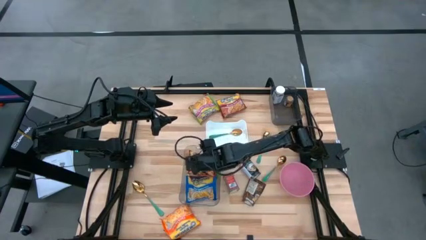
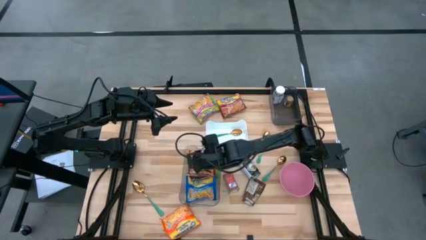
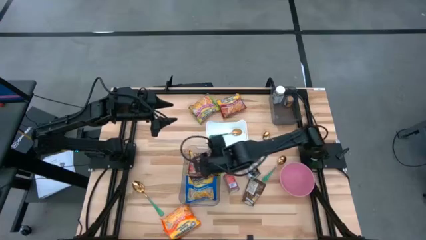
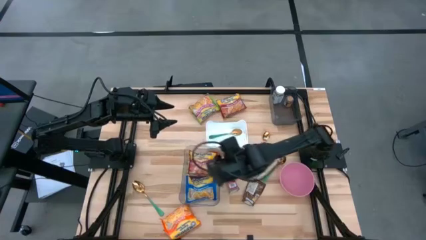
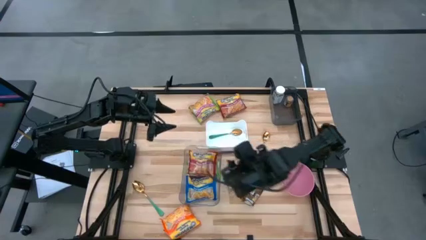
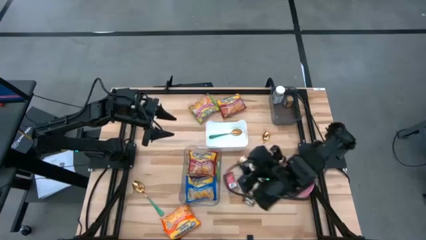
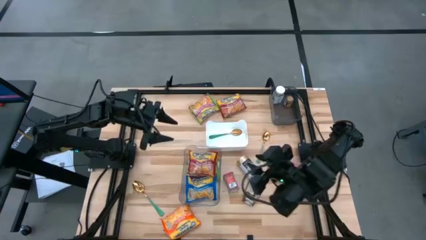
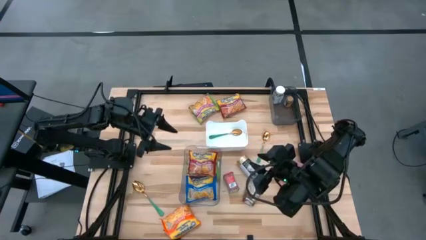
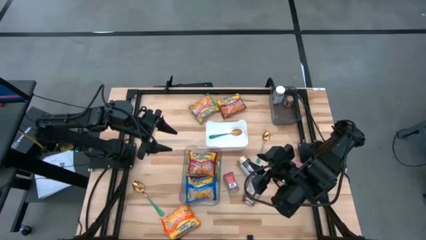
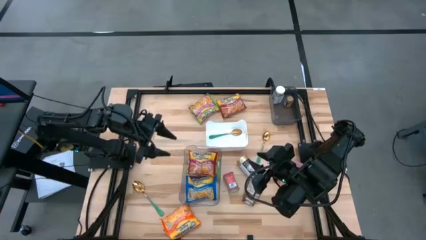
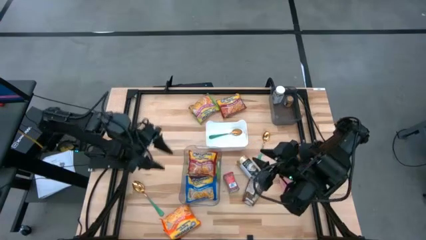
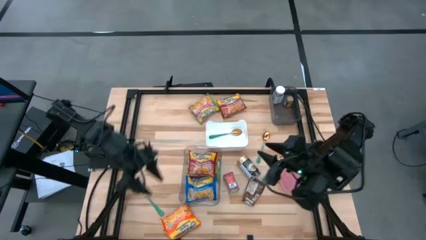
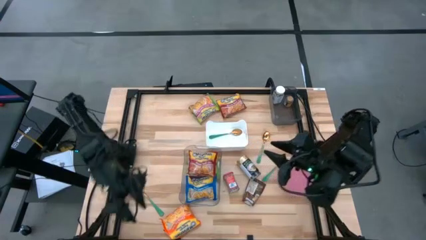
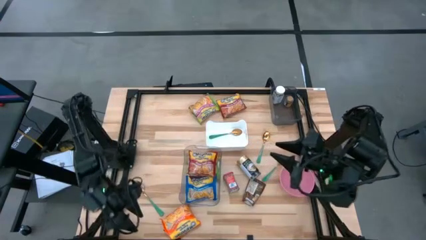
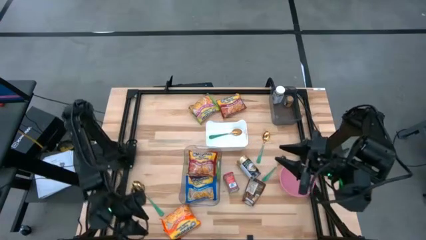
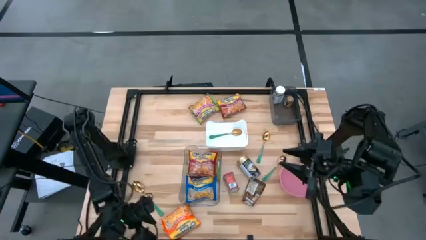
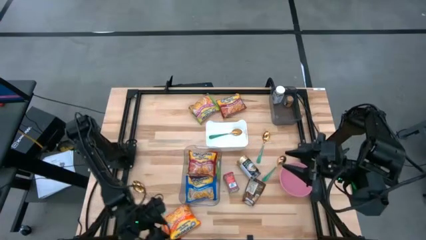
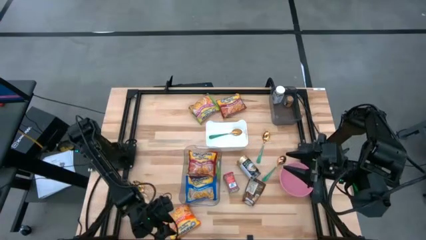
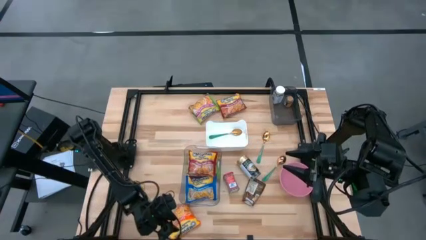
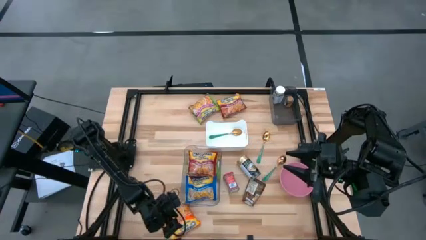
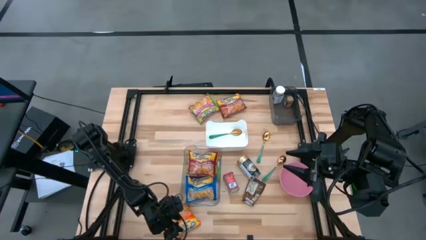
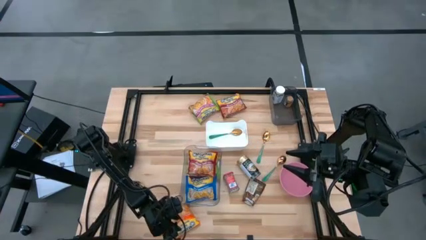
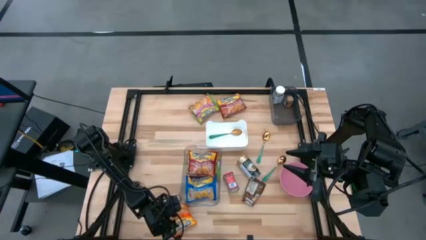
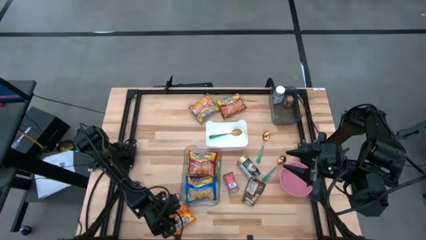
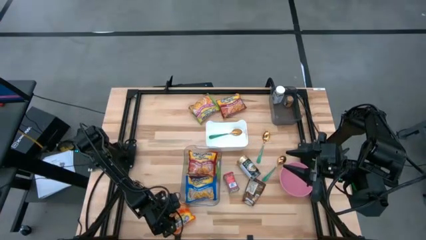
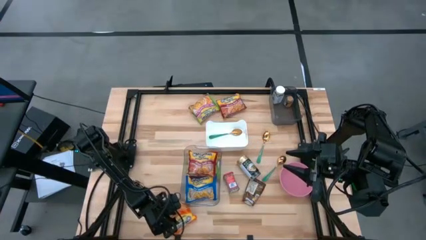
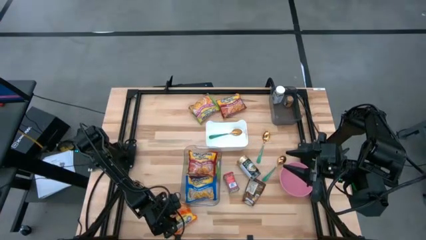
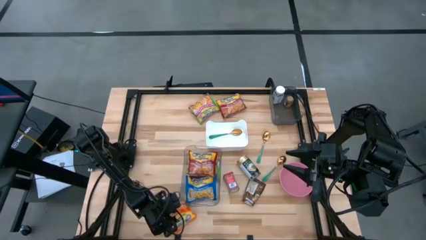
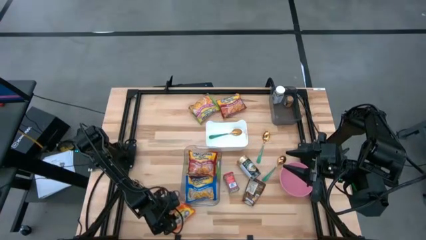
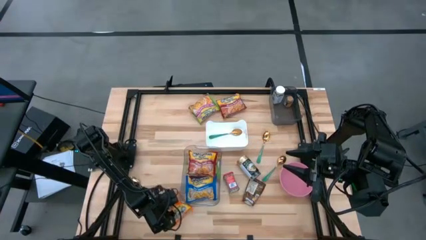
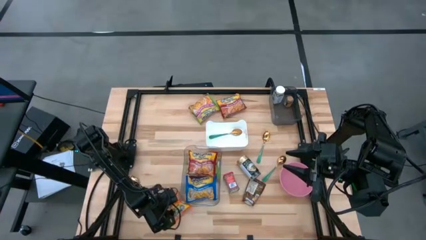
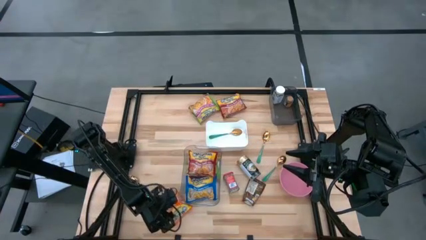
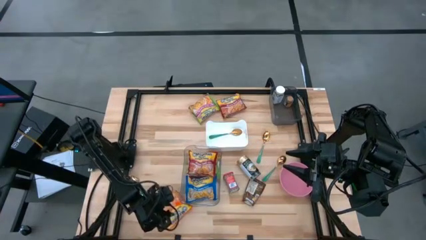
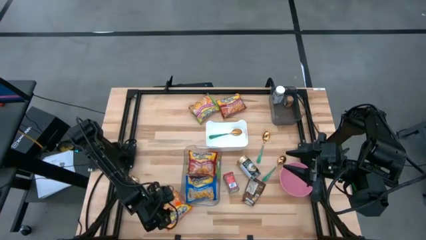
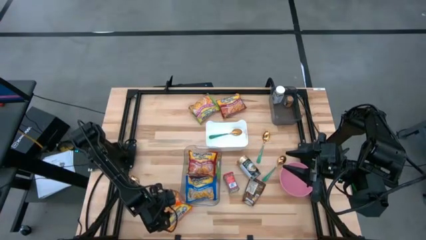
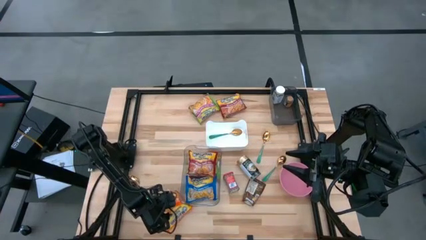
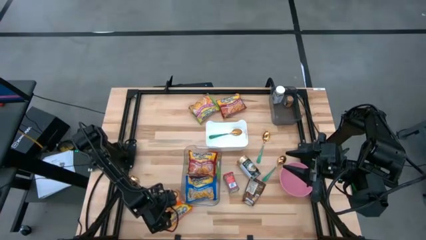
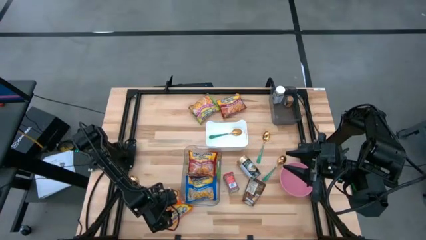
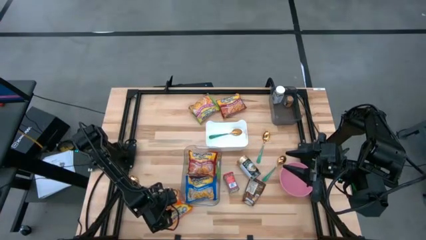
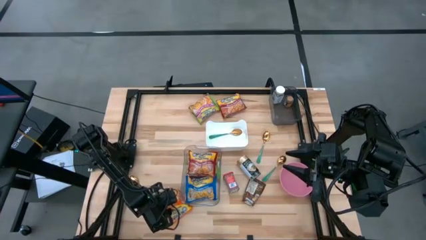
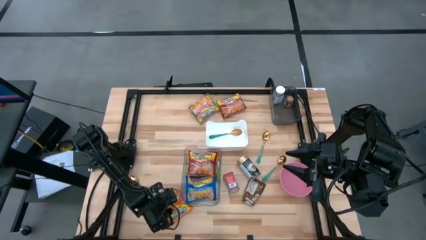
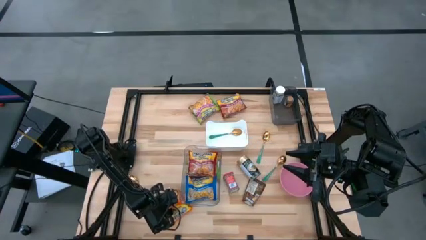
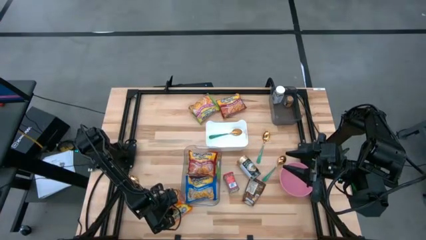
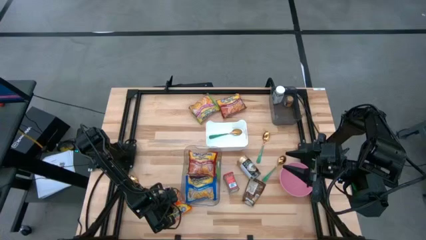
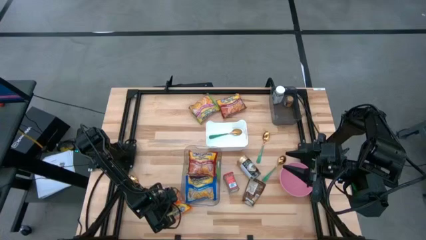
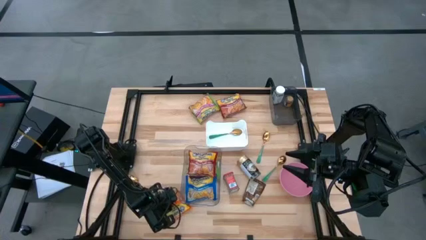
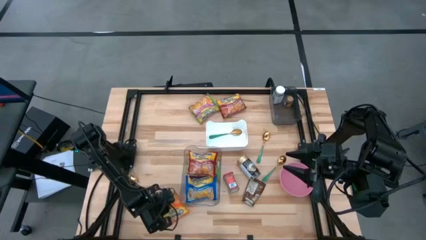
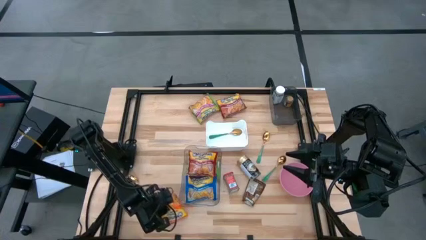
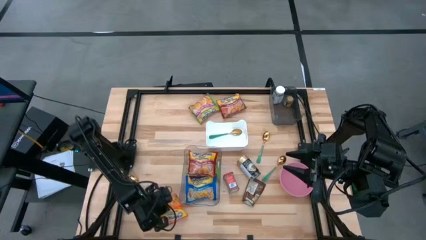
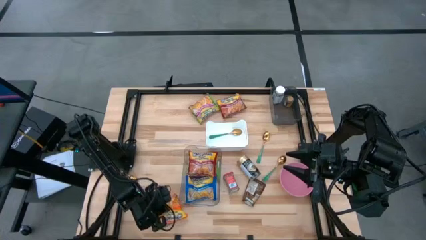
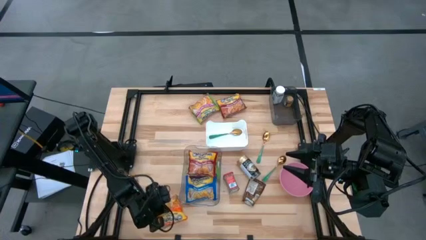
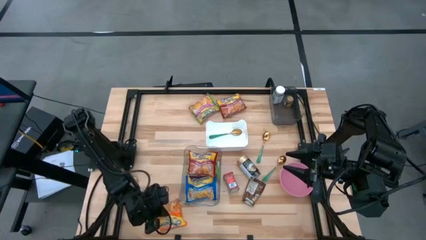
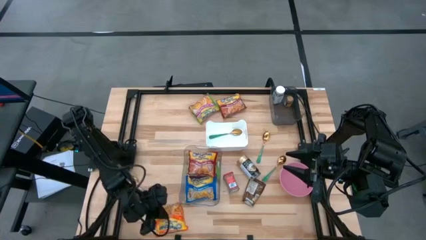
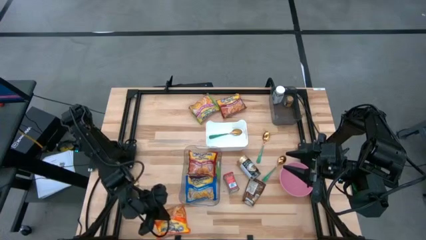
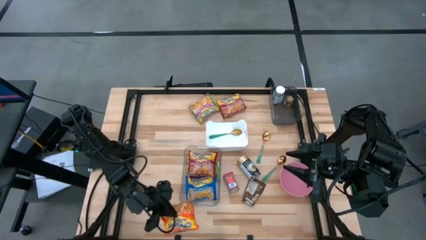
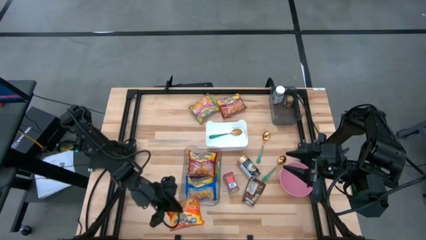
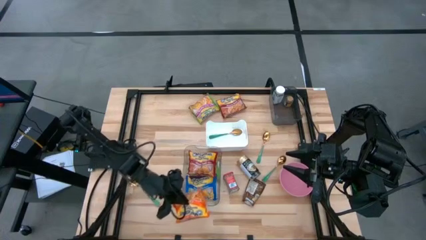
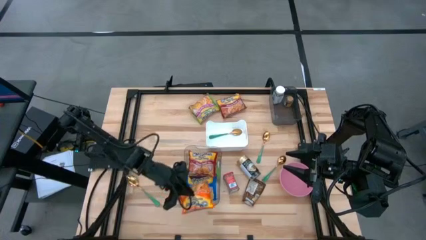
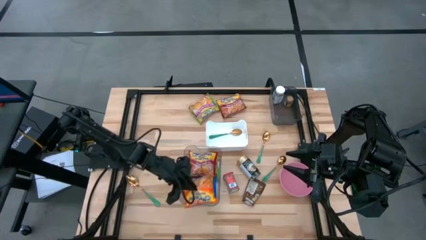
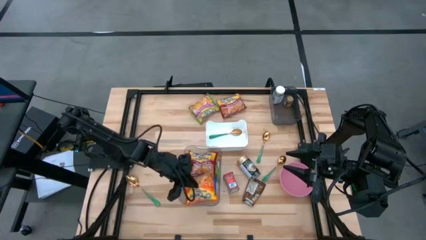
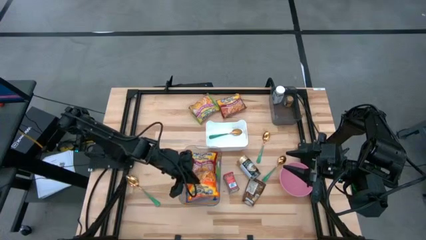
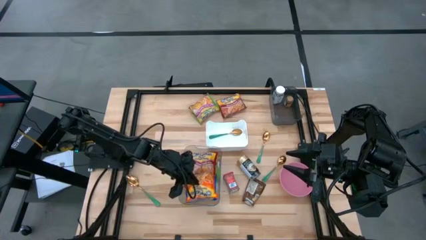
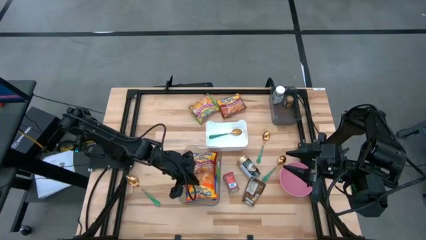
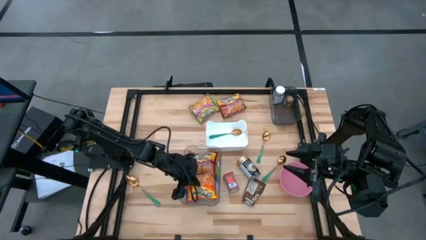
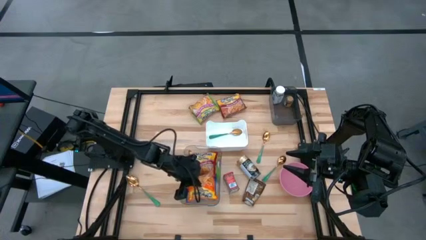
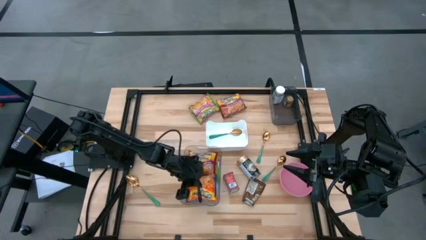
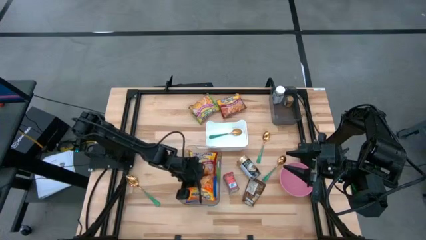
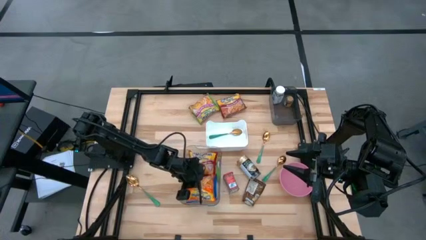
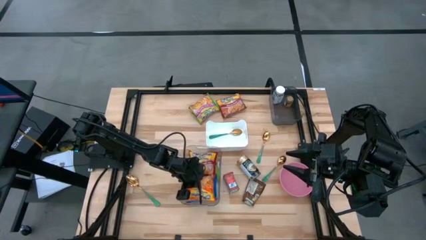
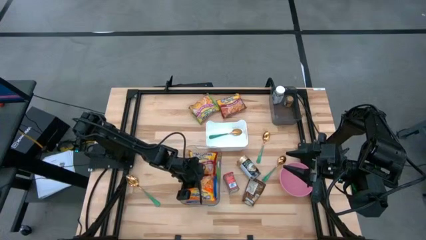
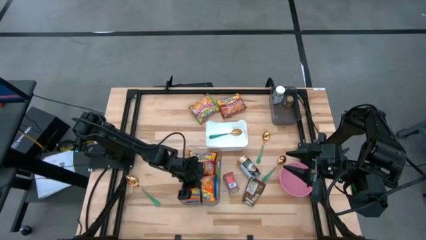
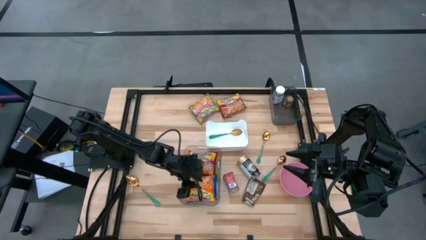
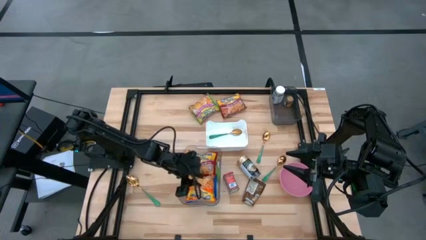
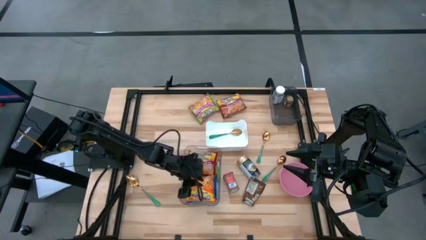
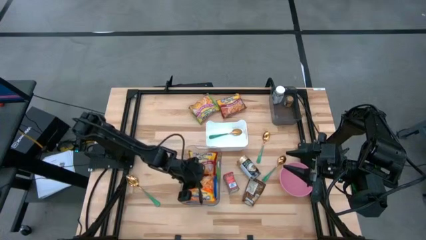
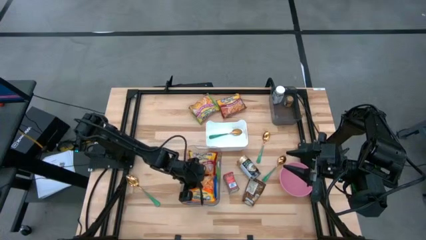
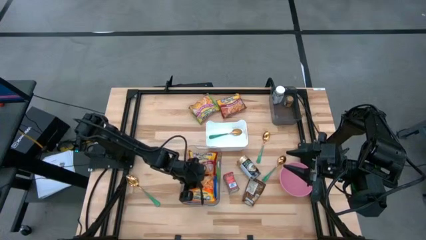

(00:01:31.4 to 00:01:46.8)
Task: Pick & Place Food Item
Put the orange noodle pack into the transparent bin
